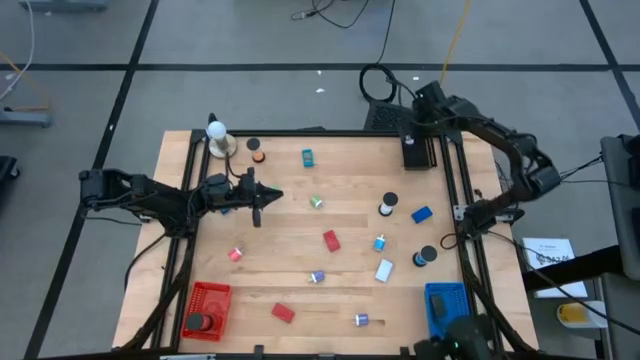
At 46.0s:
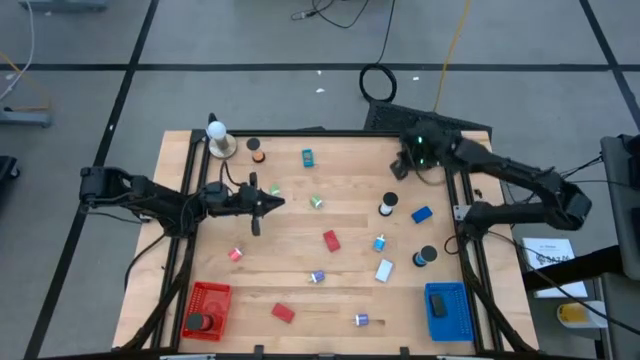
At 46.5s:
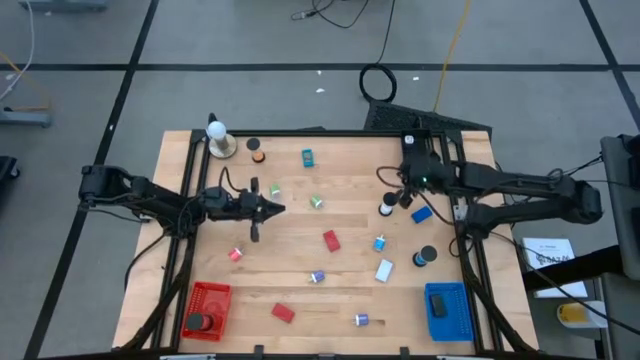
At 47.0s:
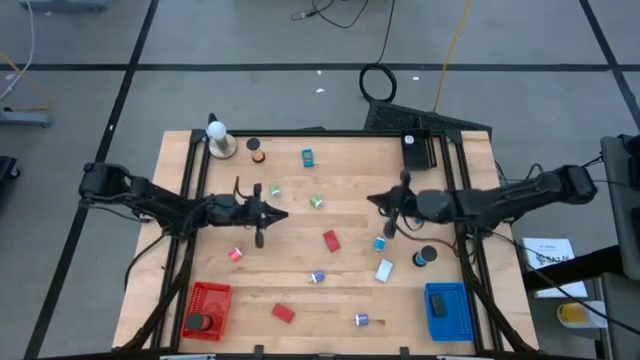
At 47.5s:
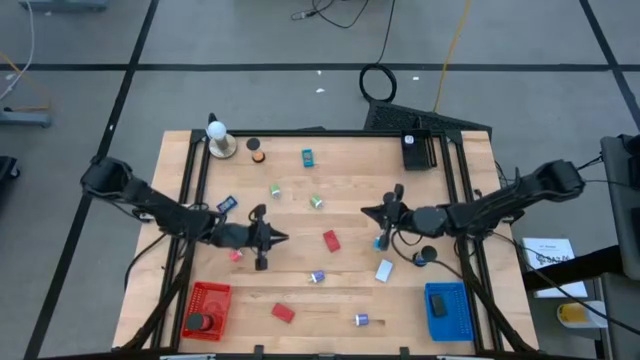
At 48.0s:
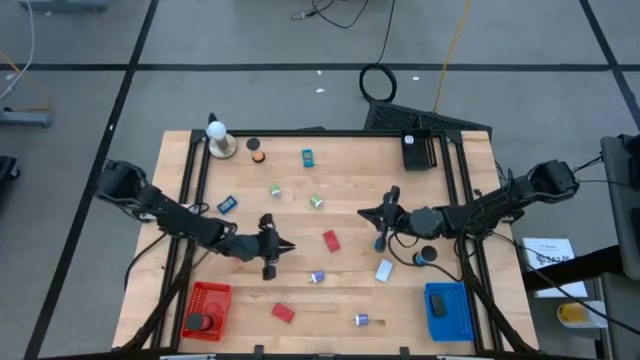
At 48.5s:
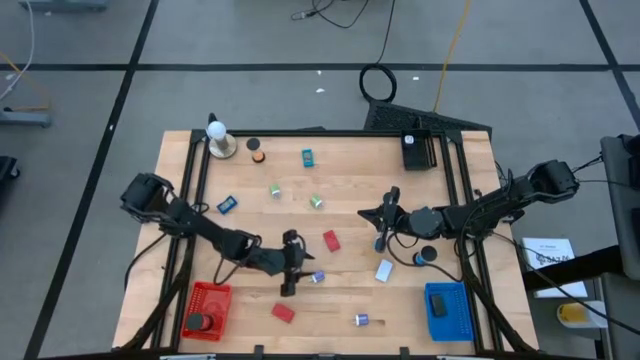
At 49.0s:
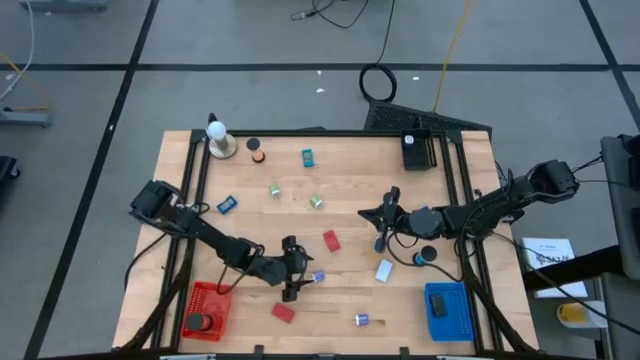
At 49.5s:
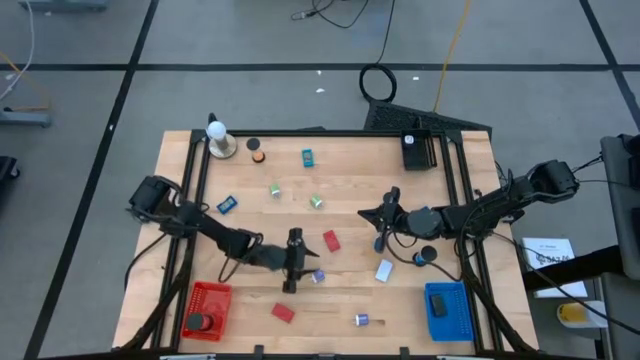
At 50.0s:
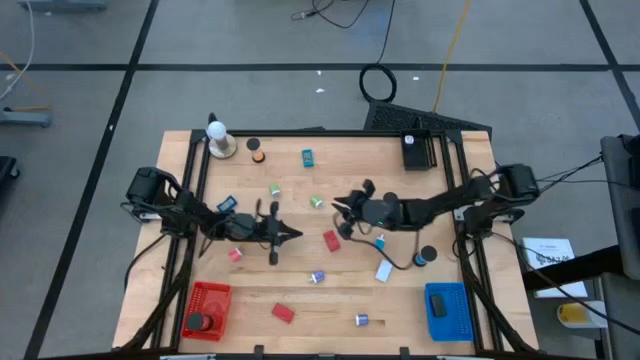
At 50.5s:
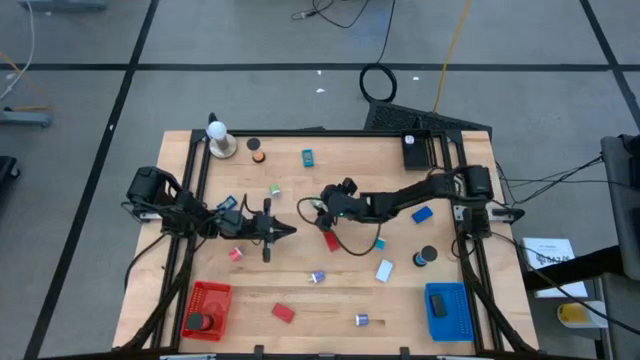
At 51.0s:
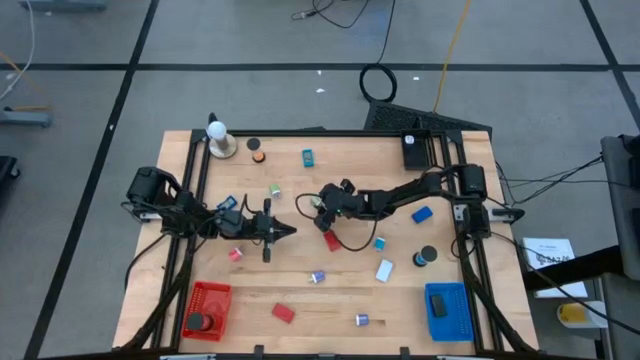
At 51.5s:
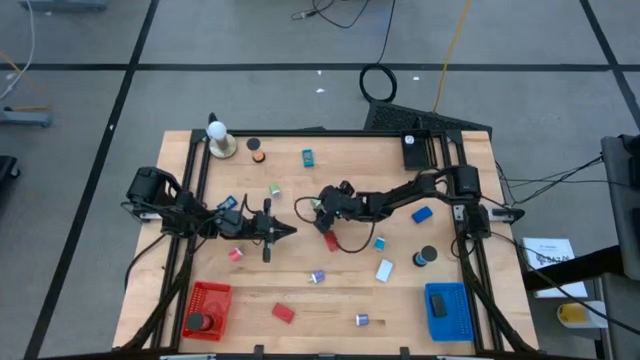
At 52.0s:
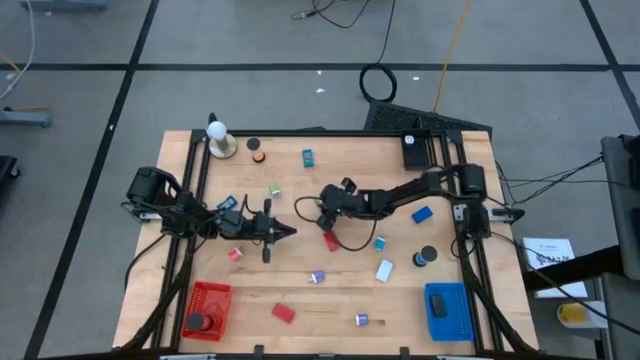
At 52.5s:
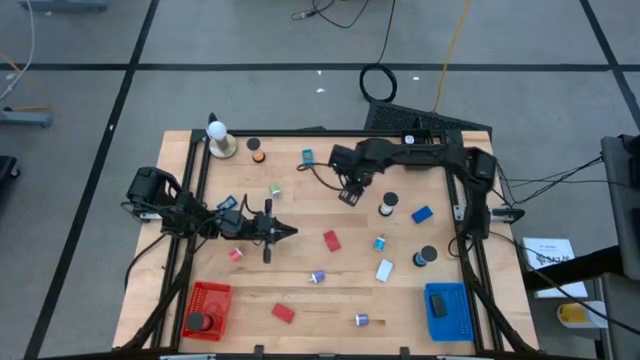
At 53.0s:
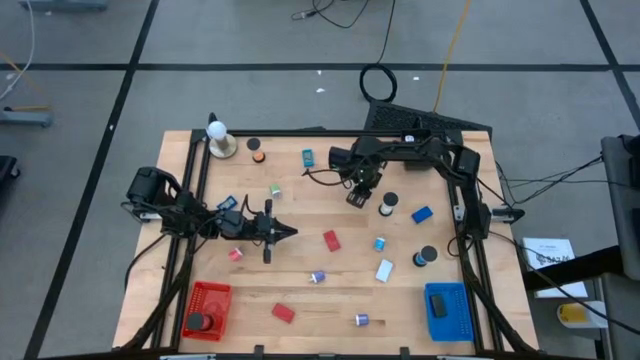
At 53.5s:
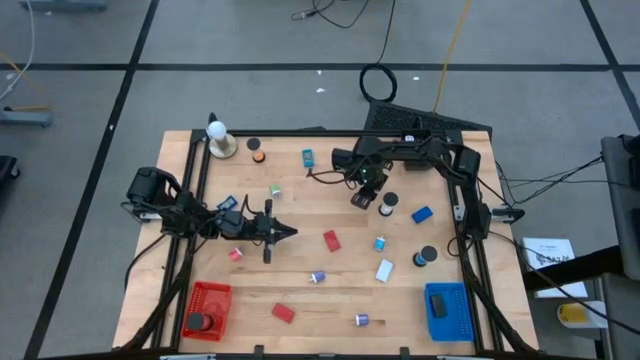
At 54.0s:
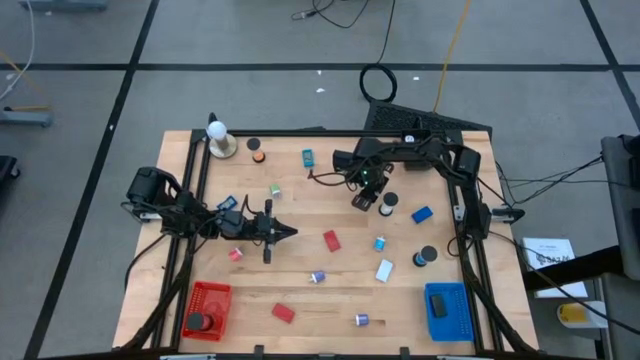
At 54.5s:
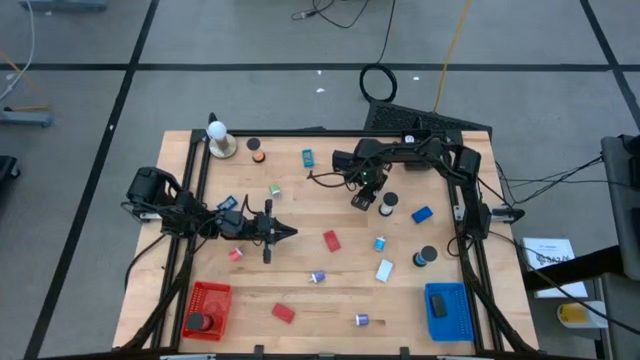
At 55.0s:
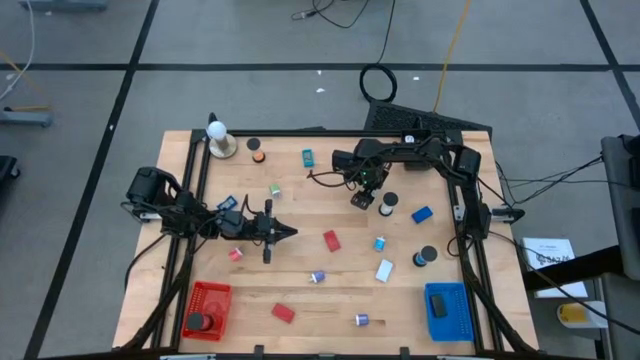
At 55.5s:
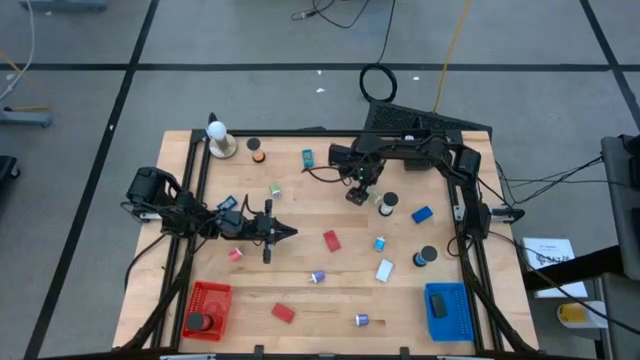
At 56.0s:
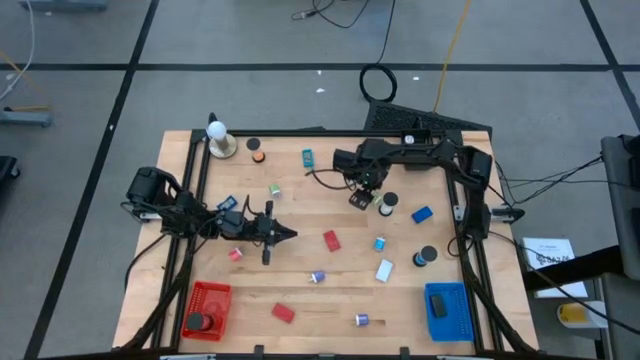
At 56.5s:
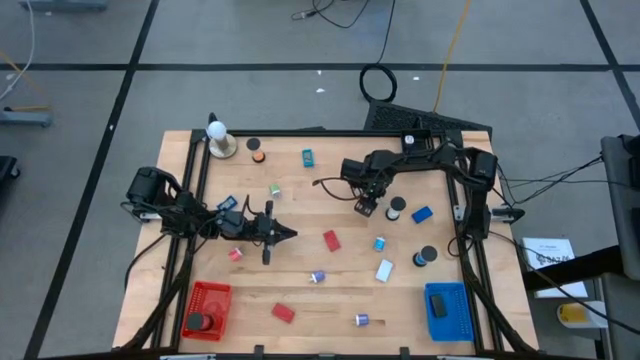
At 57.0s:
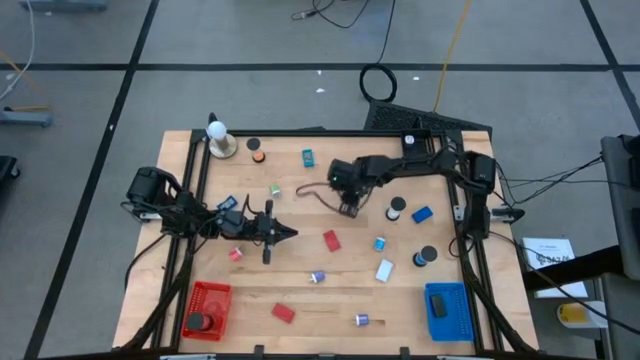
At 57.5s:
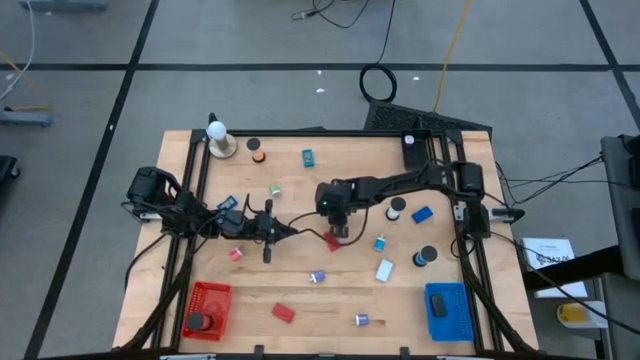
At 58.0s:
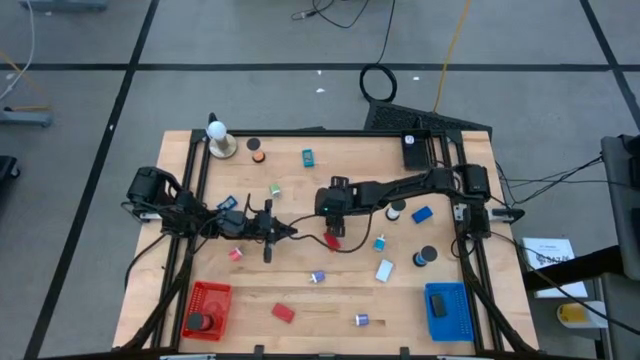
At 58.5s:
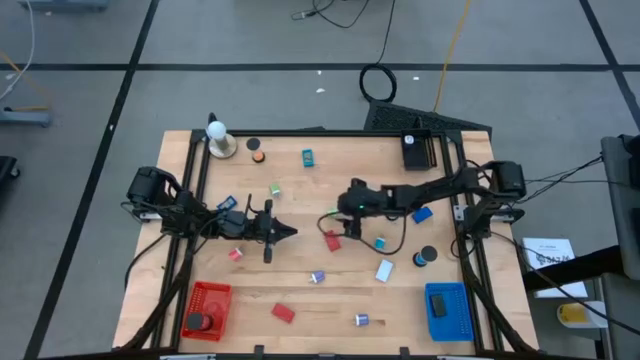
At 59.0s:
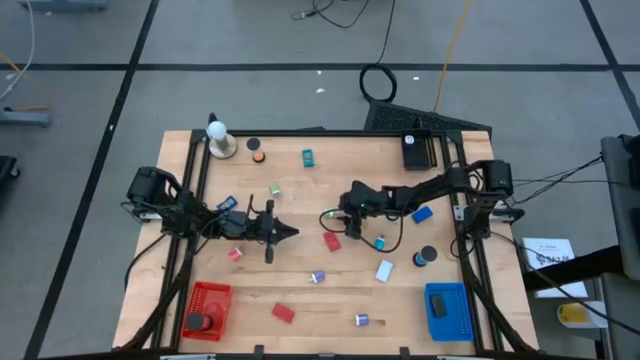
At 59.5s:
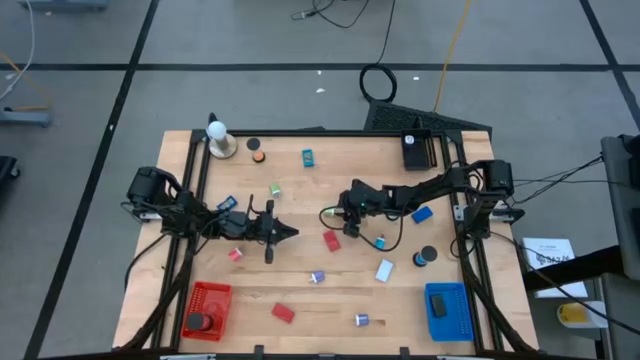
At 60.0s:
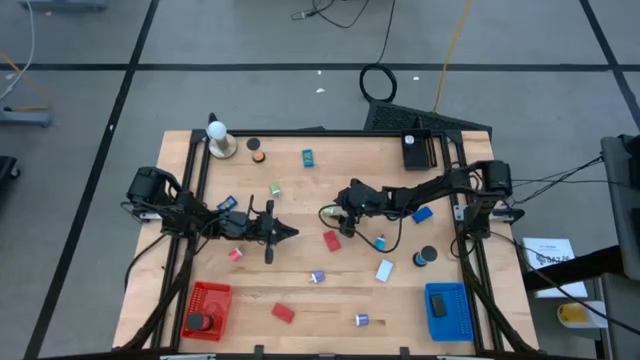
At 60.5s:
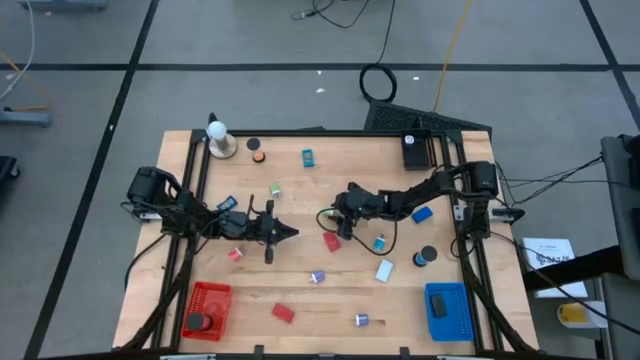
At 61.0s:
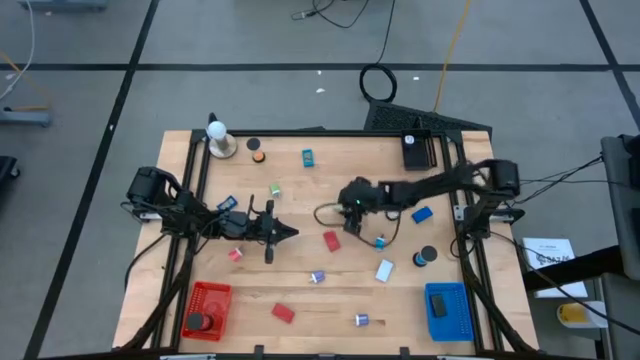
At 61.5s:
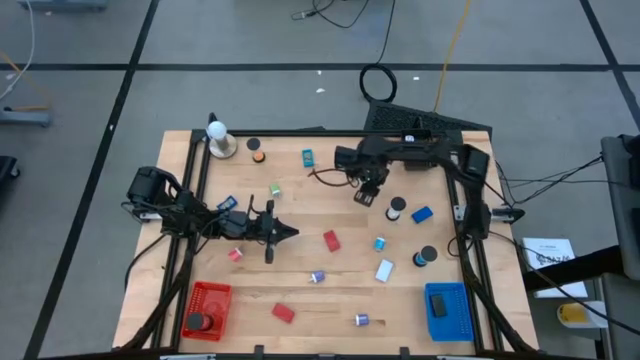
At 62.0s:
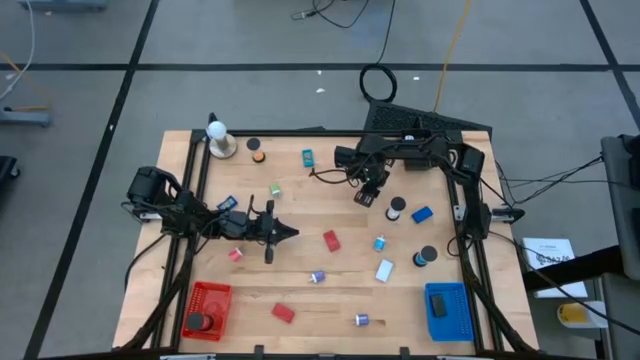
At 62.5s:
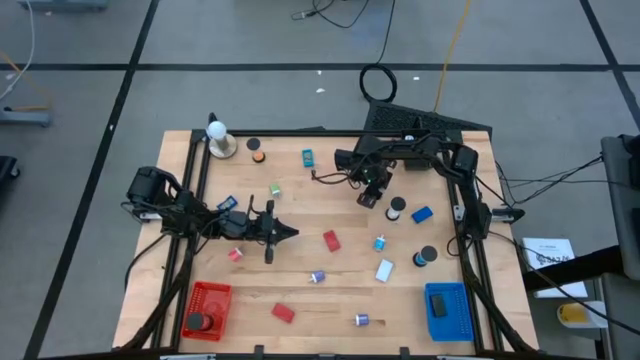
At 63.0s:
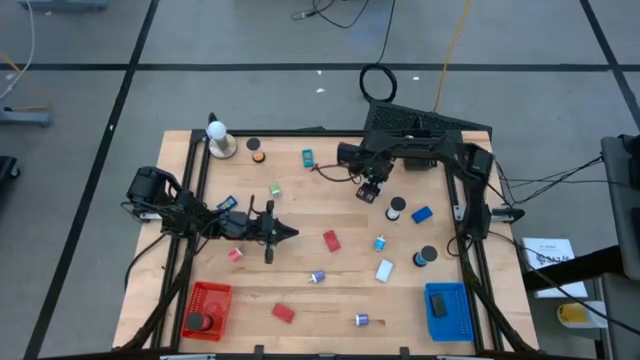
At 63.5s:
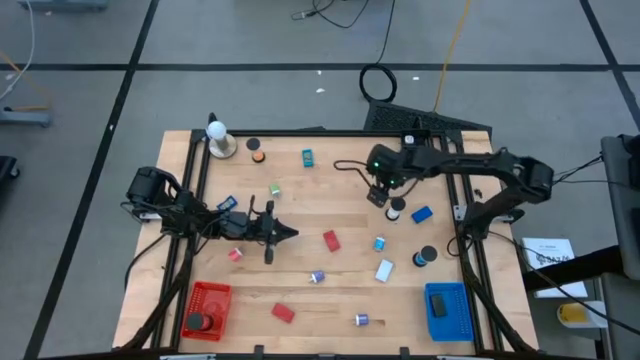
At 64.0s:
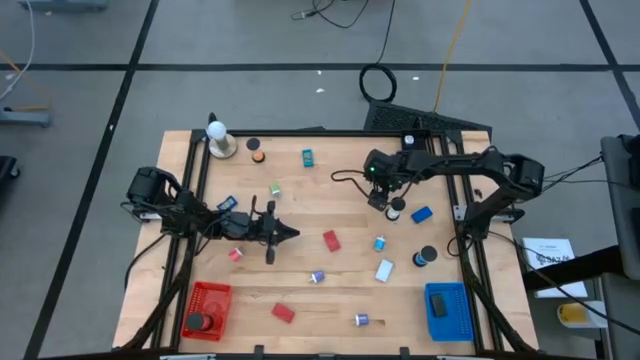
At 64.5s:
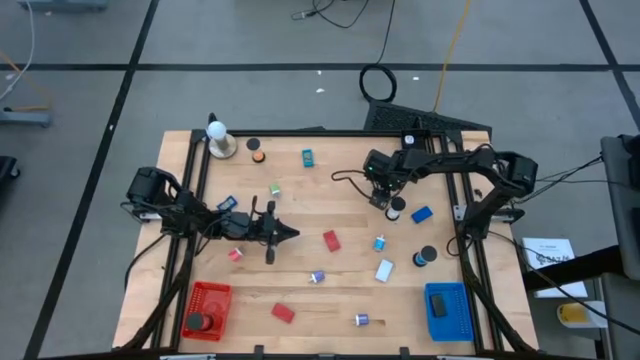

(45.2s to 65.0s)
Task: Pick & Place Office items
Put the green charger adapter into the black bin

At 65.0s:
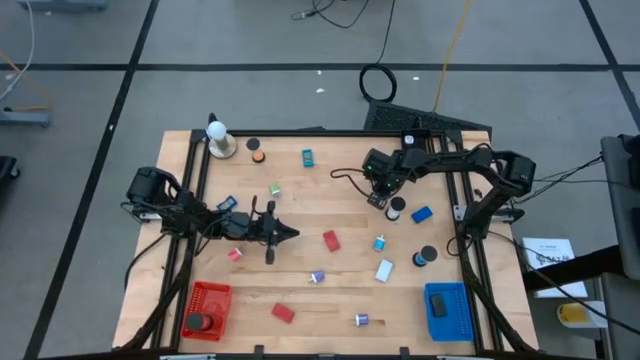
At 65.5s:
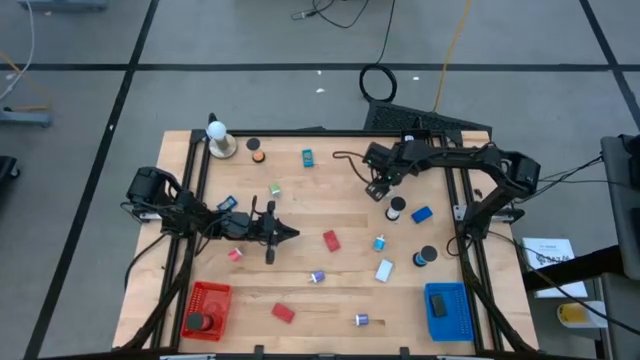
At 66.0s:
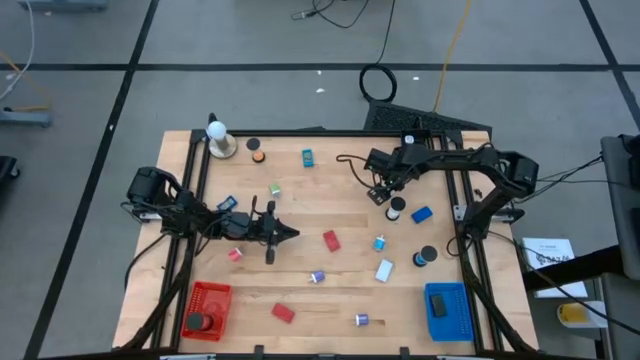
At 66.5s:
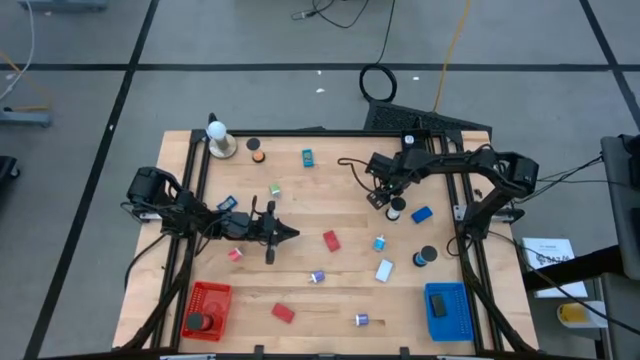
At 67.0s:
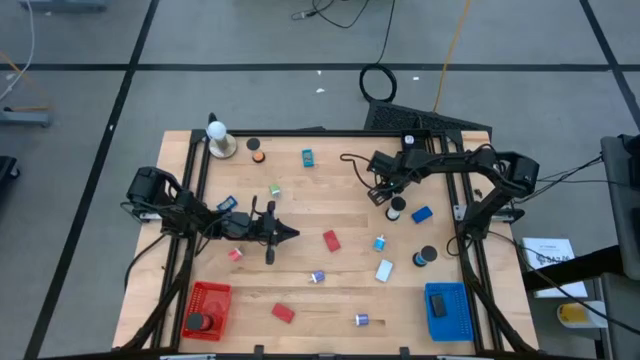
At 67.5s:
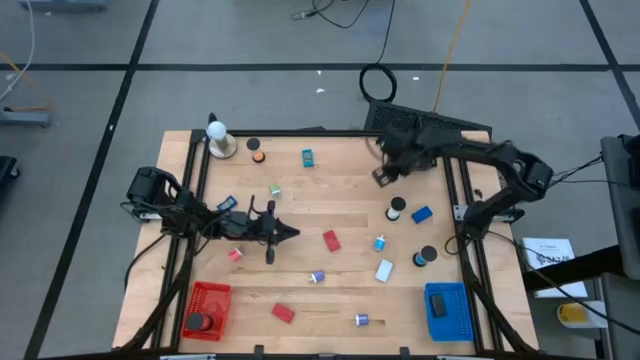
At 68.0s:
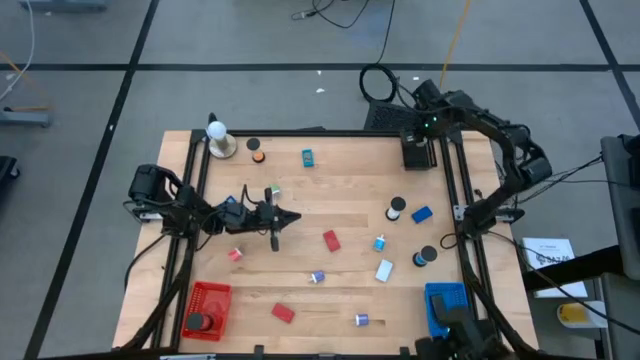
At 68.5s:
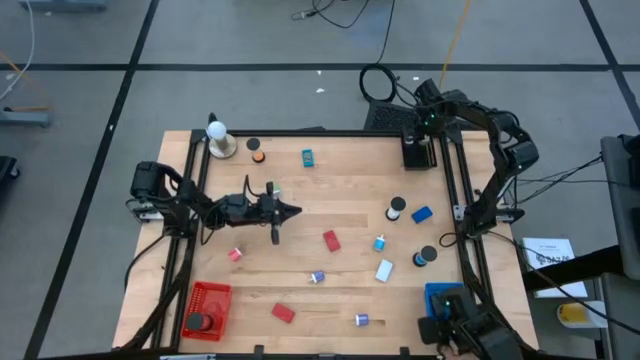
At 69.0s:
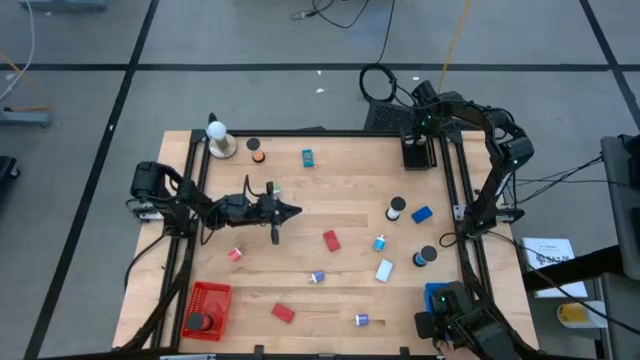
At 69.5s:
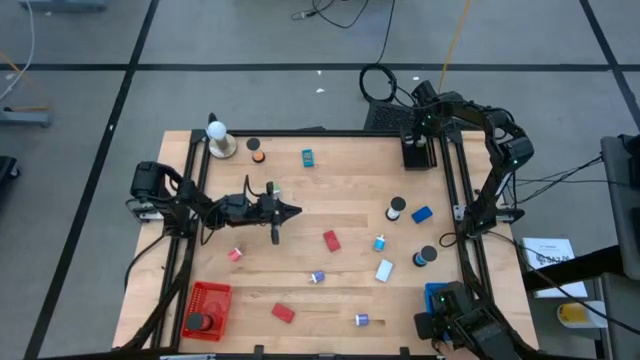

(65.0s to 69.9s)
Put the white charger adapter into the black bin
